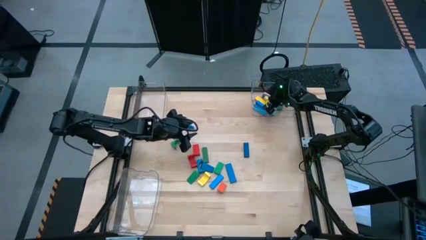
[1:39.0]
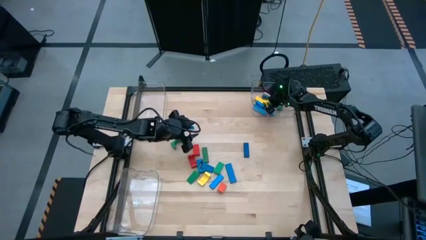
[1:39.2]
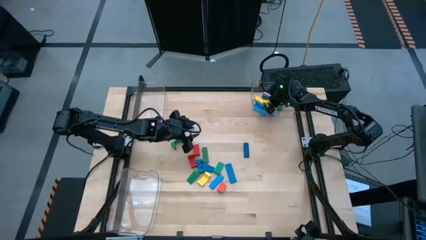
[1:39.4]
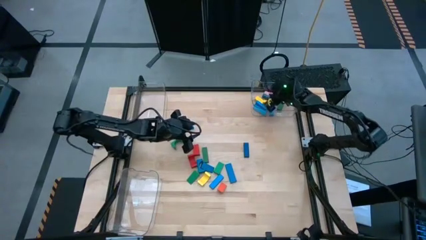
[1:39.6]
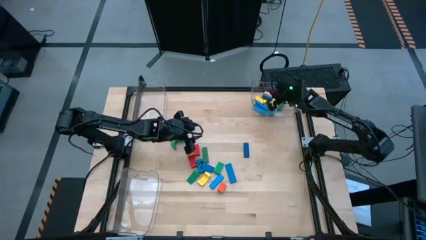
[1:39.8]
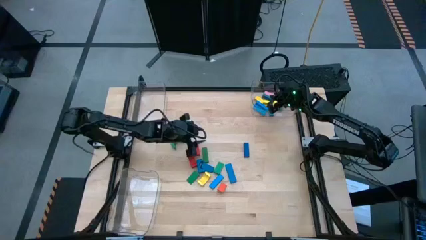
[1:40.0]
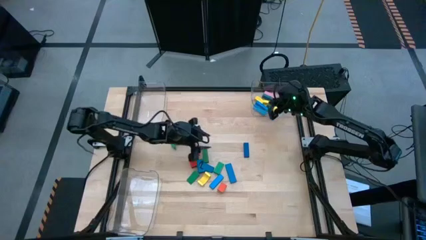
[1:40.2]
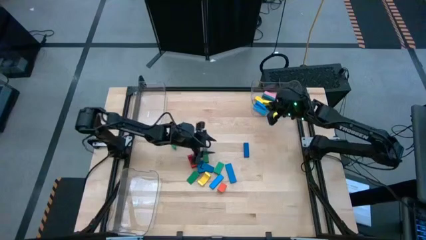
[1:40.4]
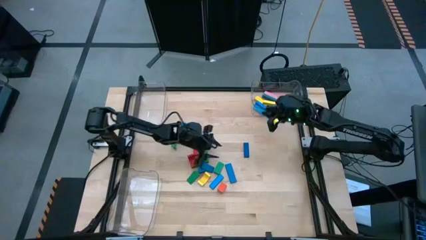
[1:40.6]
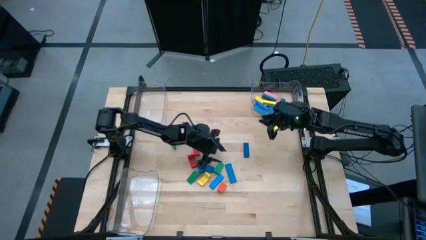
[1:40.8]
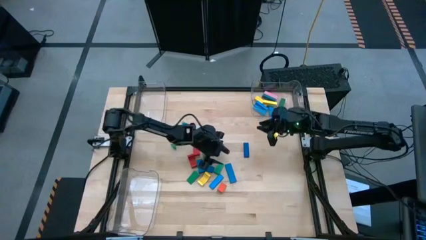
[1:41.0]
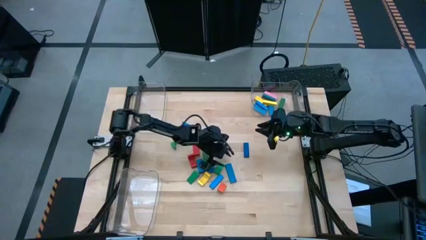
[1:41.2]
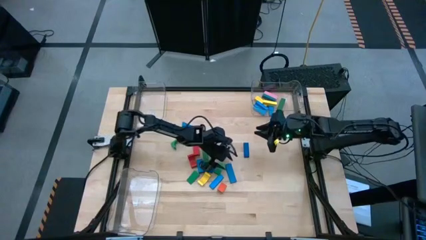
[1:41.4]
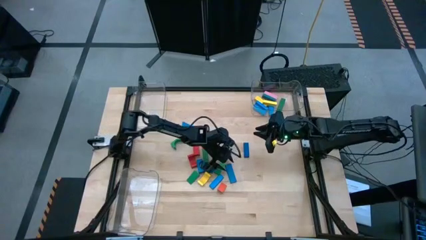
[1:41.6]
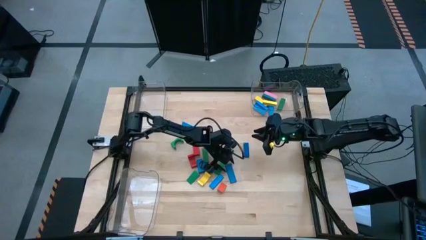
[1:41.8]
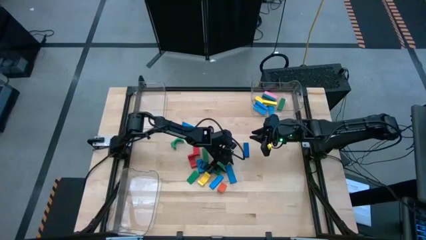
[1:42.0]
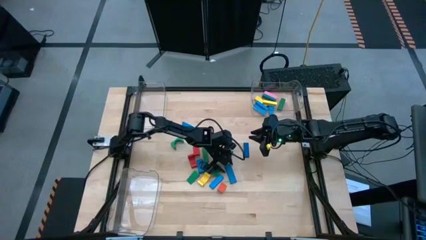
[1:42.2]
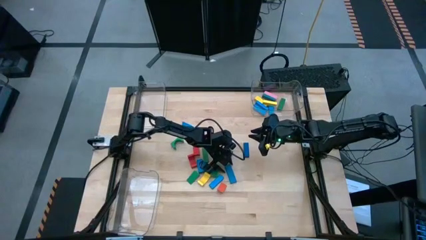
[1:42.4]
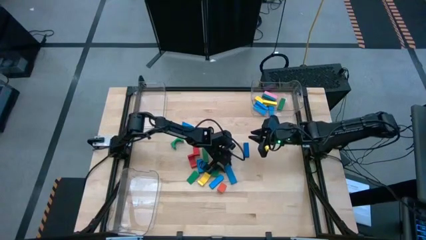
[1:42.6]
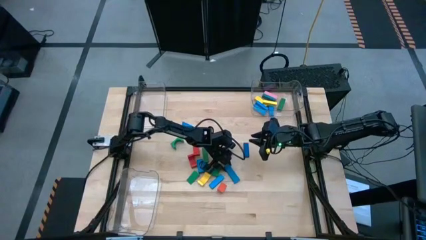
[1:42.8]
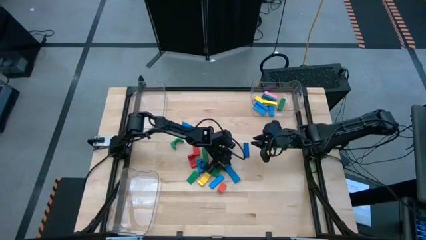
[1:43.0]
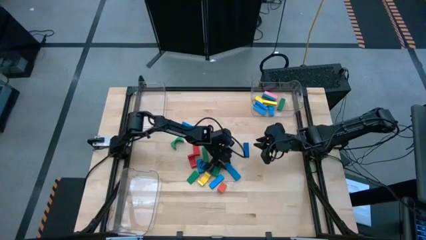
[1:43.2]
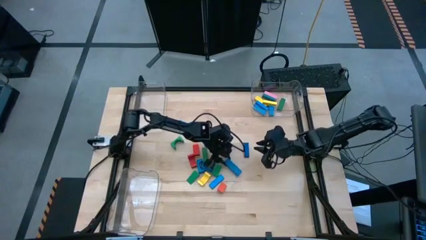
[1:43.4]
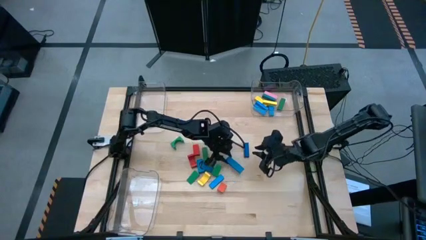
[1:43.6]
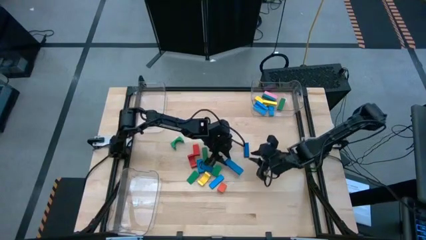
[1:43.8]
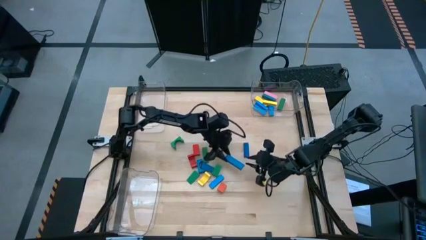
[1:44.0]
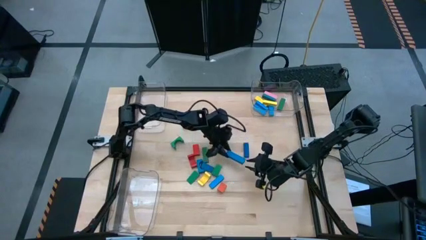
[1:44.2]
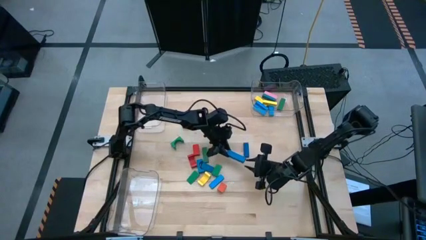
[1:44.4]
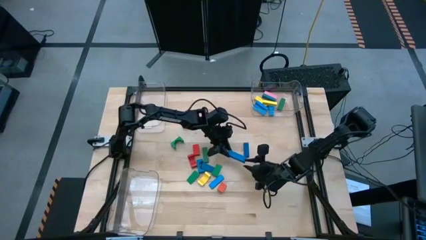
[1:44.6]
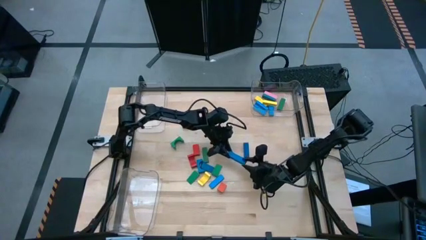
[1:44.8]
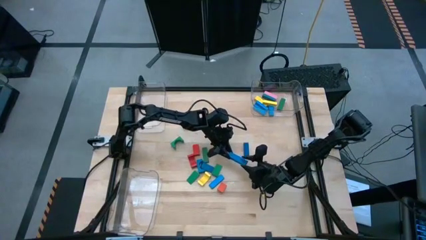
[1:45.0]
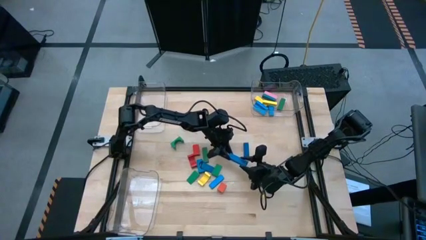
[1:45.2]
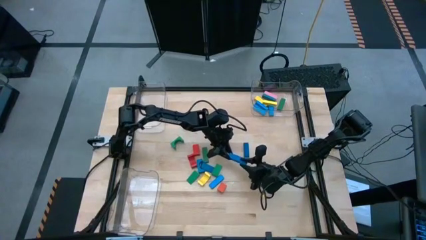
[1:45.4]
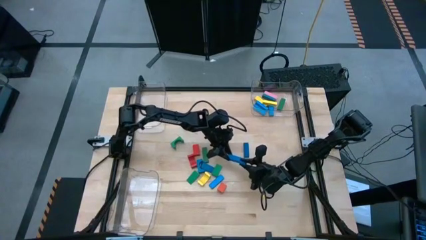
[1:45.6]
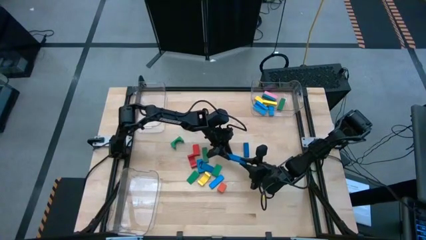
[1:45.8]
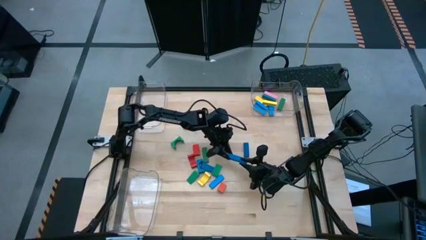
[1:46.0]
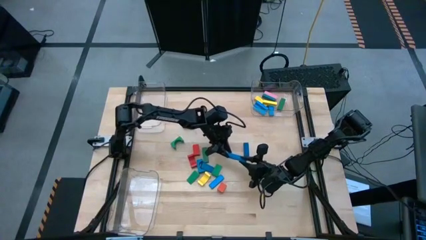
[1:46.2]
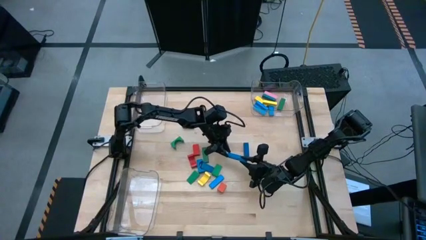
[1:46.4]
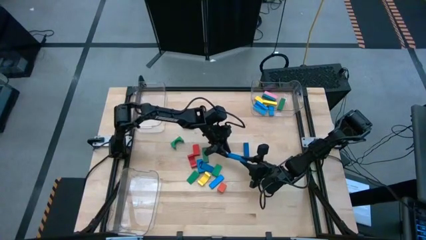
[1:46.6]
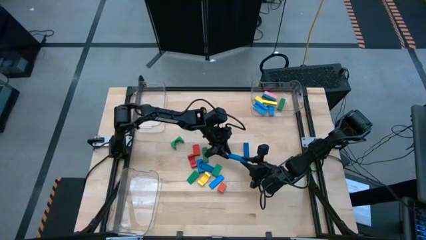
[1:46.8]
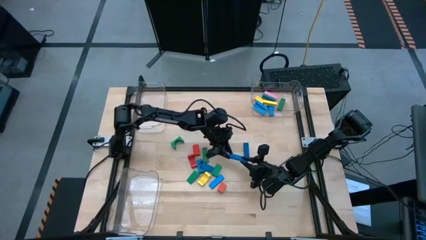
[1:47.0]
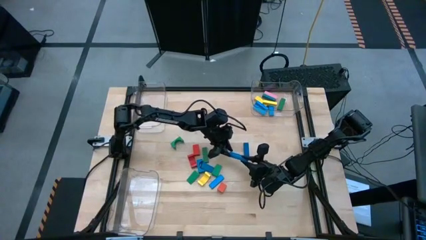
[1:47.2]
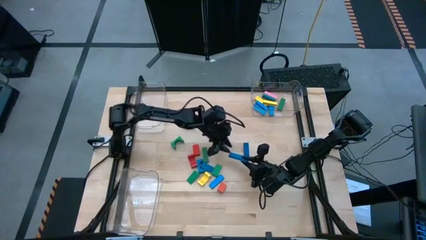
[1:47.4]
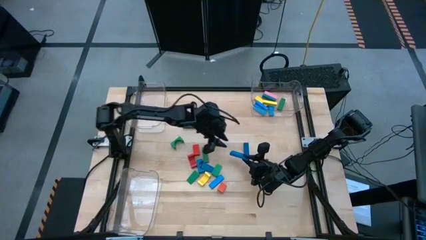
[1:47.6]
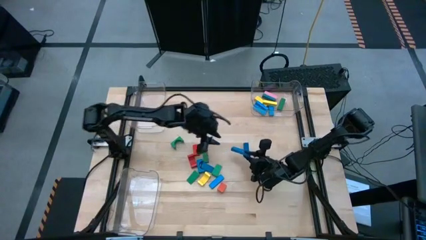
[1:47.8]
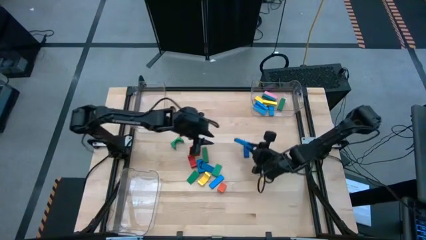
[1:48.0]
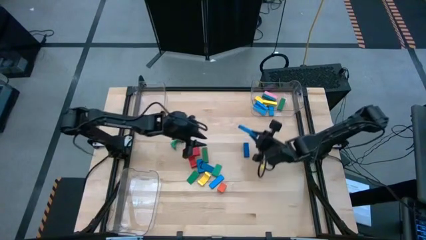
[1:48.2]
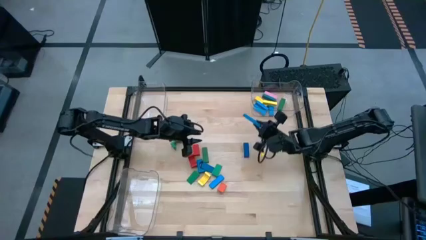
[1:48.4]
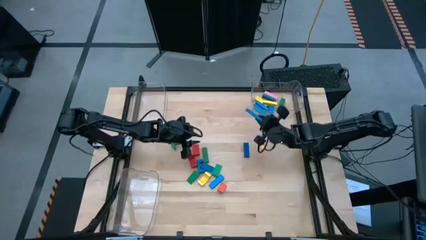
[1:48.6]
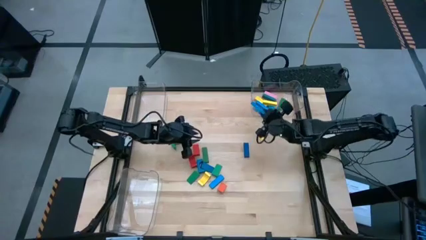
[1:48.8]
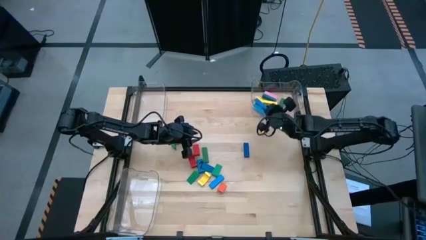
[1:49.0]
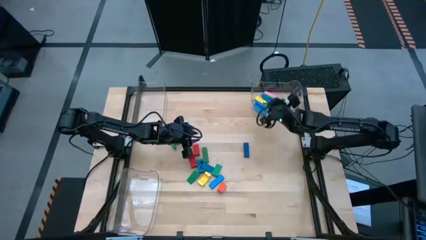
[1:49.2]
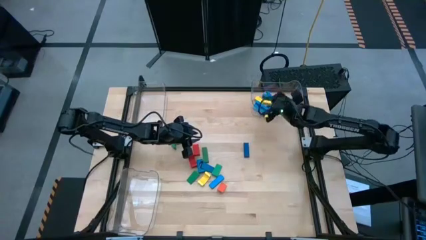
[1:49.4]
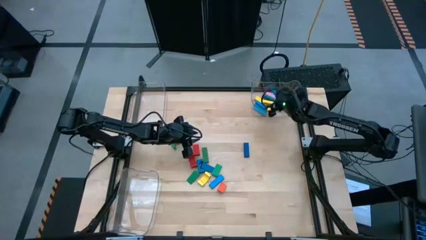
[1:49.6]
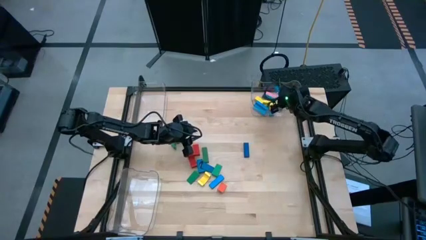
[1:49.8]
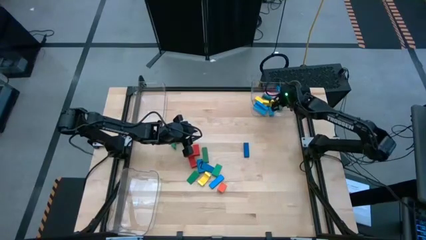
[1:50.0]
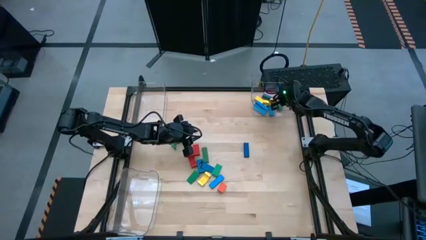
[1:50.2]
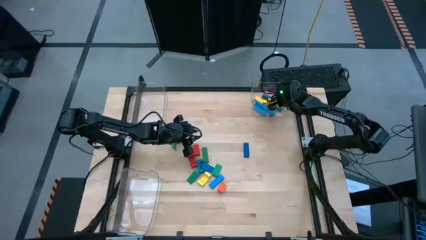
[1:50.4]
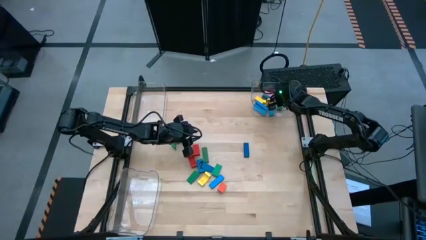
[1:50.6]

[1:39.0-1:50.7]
Task: Sort blocks by size
Put the blue rectangular block into the top right transparent bin

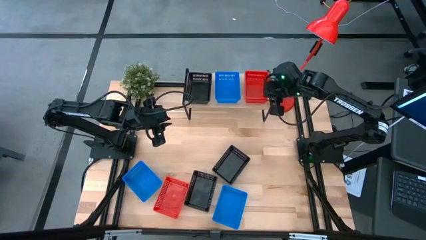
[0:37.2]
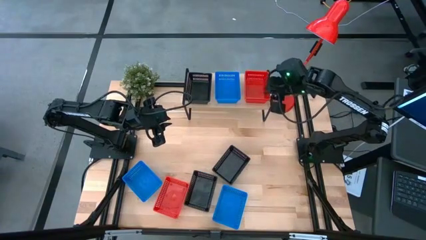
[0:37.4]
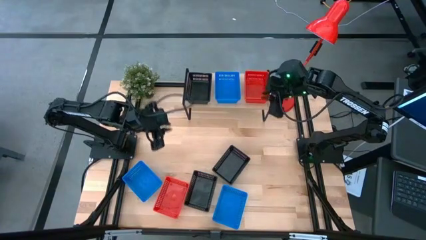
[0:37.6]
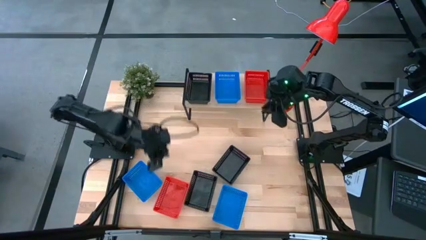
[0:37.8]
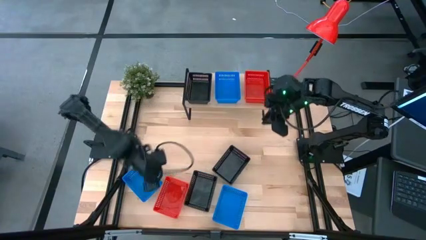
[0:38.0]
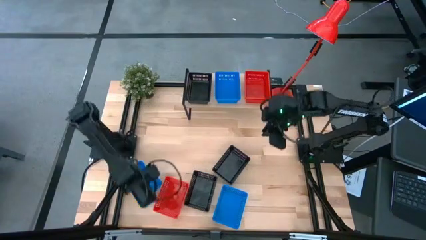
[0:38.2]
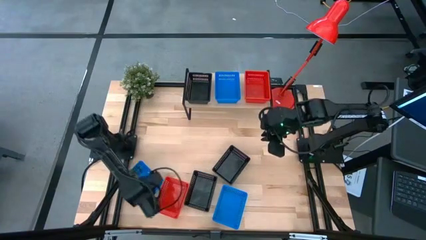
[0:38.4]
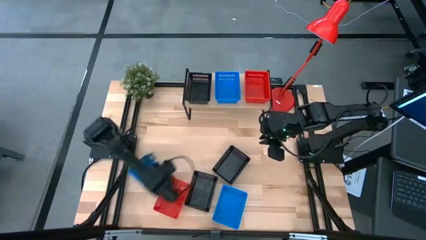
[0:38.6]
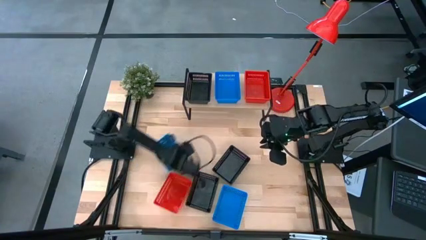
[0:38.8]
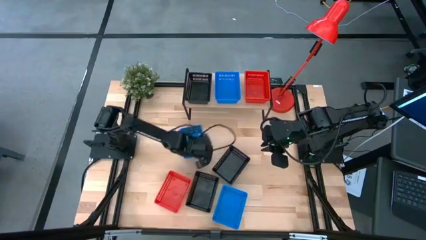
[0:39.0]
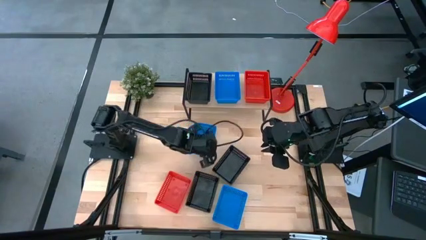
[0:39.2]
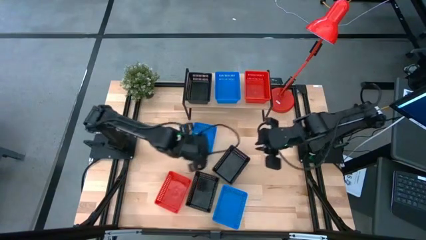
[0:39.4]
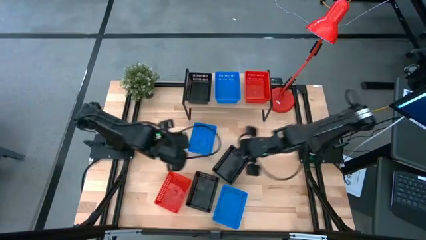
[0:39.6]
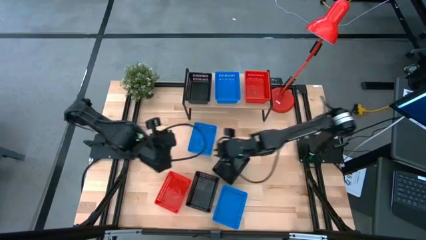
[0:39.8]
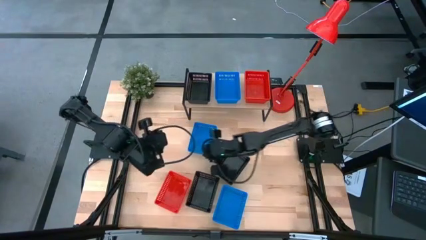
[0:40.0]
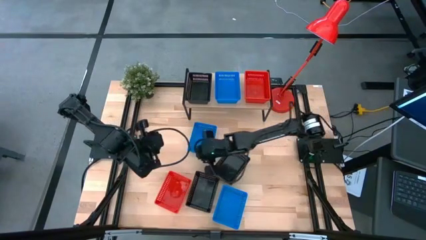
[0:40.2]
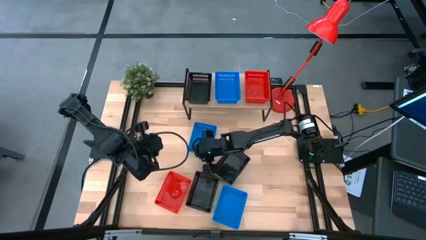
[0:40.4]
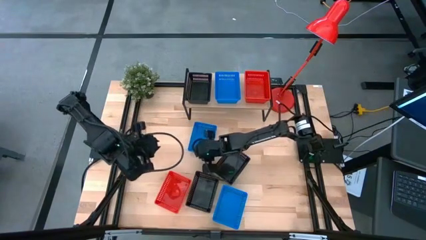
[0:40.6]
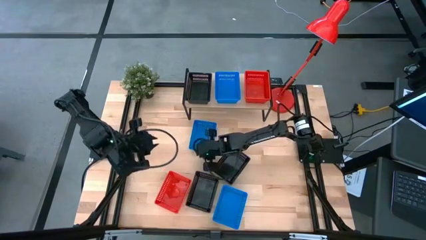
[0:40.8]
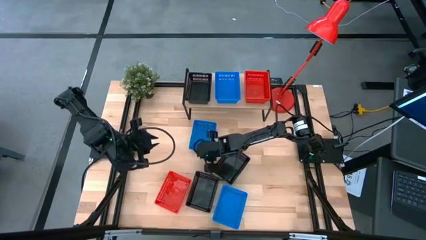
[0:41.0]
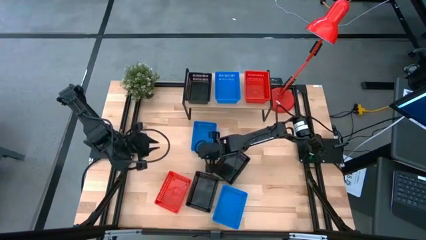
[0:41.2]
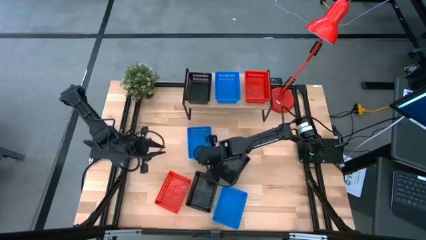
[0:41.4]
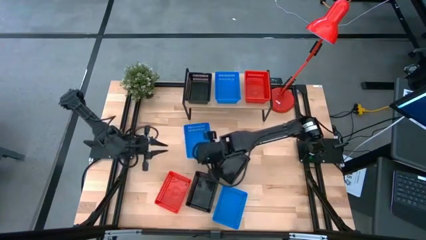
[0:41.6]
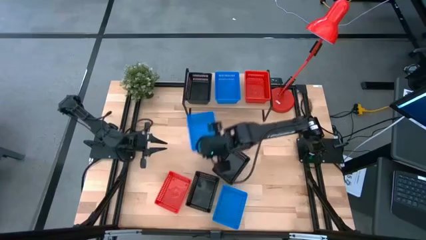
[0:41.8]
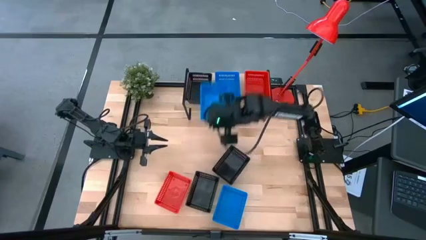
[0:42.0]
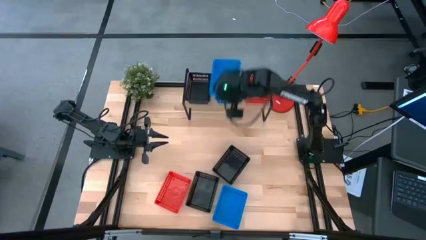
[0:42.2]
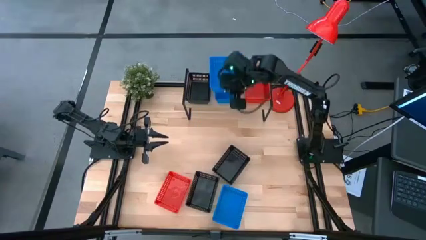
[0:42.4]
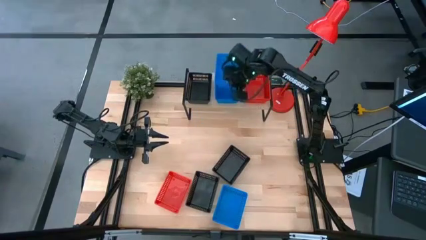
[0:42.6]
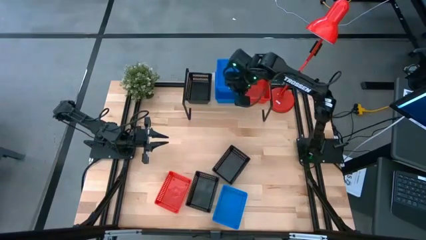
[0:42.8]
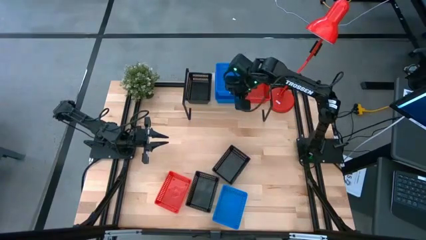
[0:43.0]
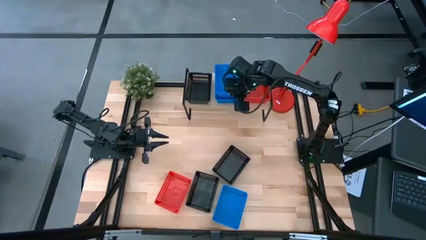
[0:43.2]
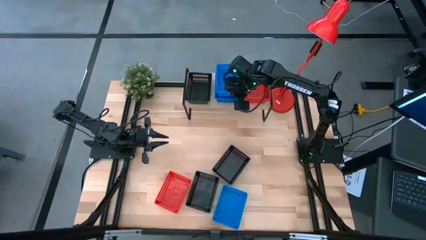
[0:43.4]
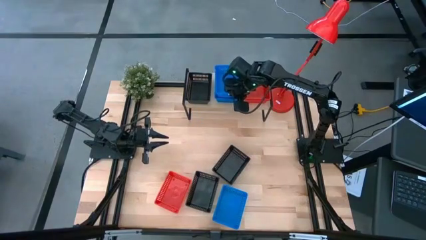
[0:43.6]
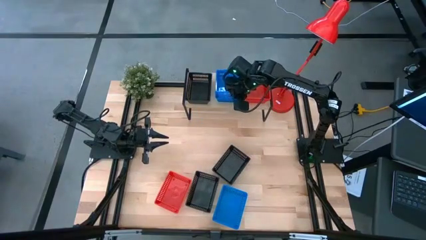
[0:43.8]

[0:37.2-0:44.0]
Task: Stack baskets on shelf by color
Stack the left blue basket on top of the blue basket on the shelf
